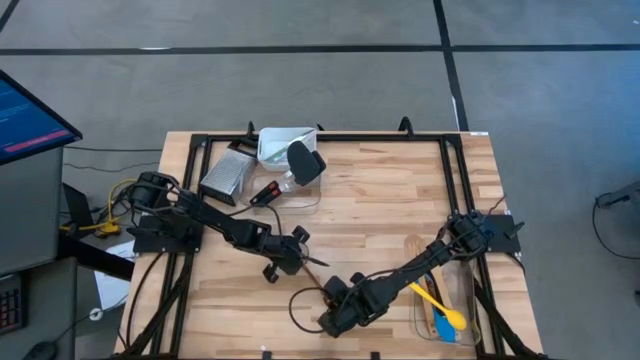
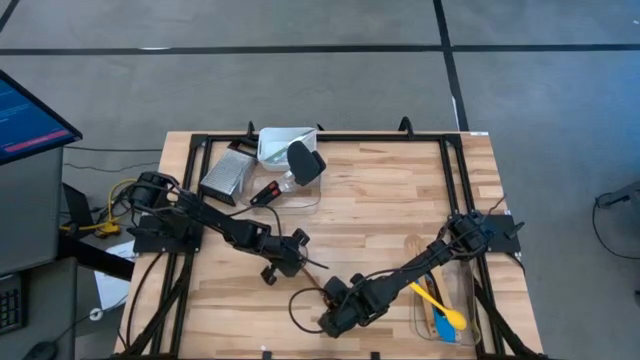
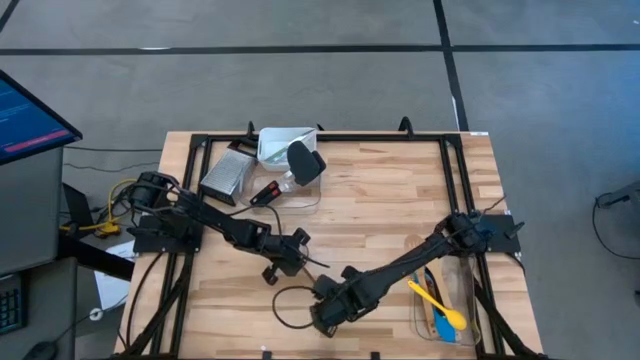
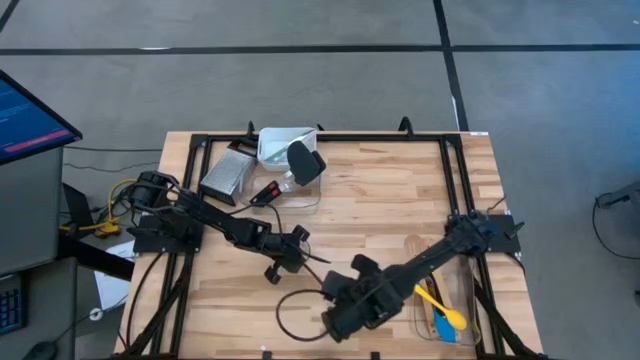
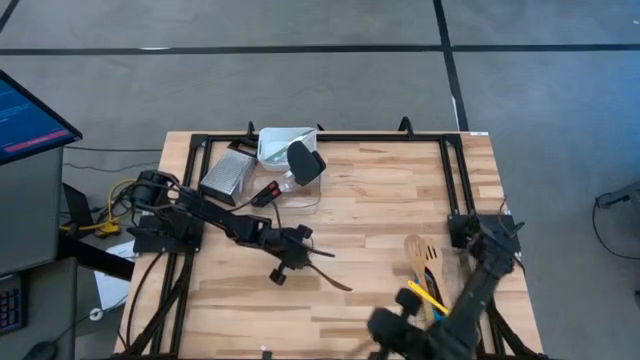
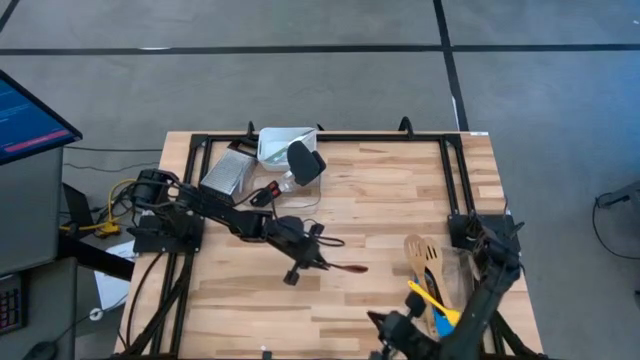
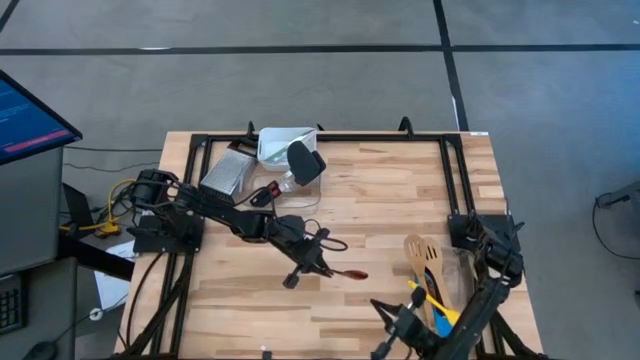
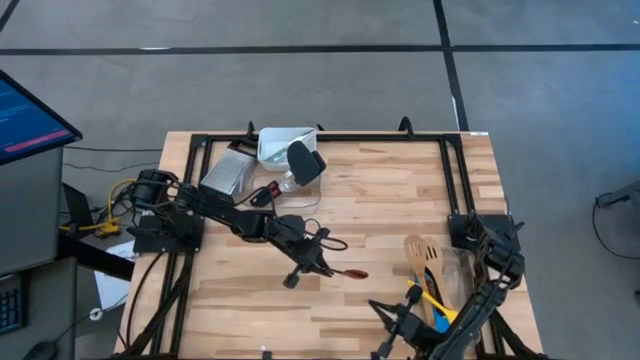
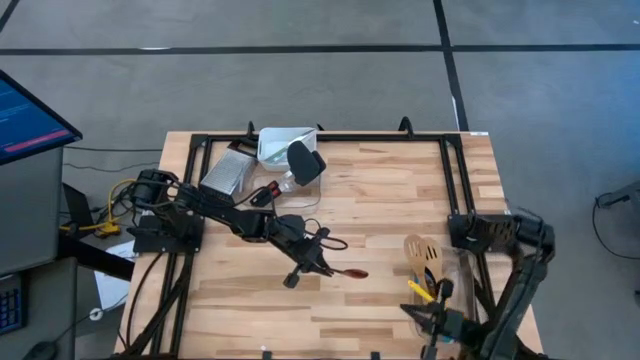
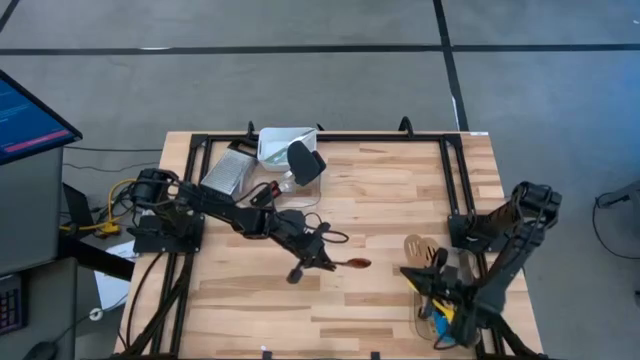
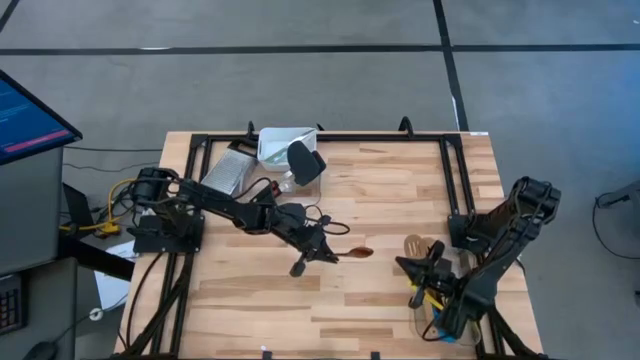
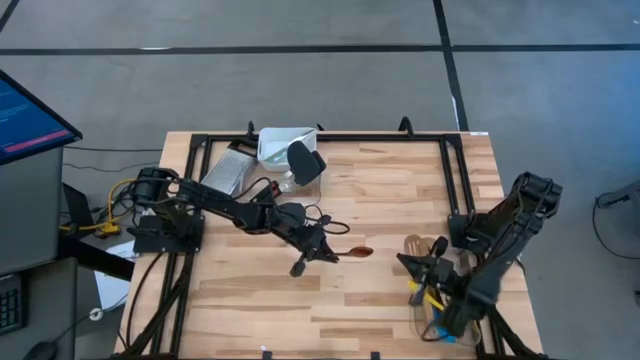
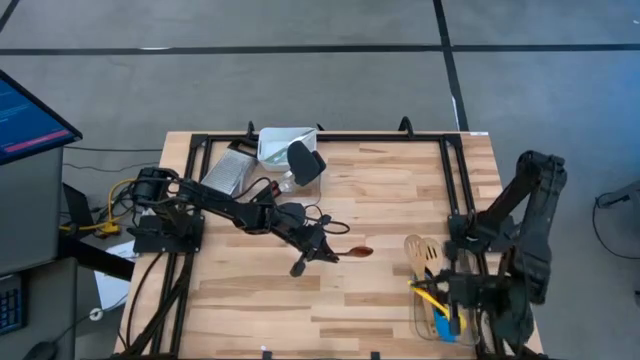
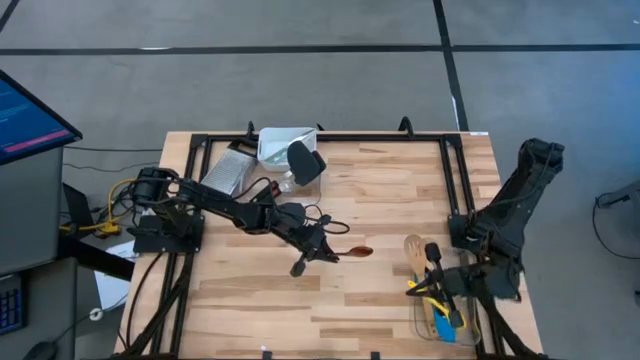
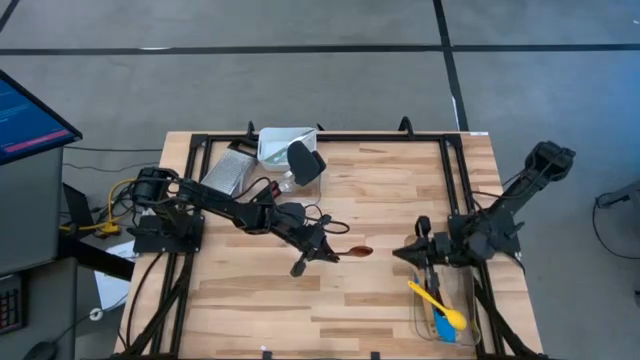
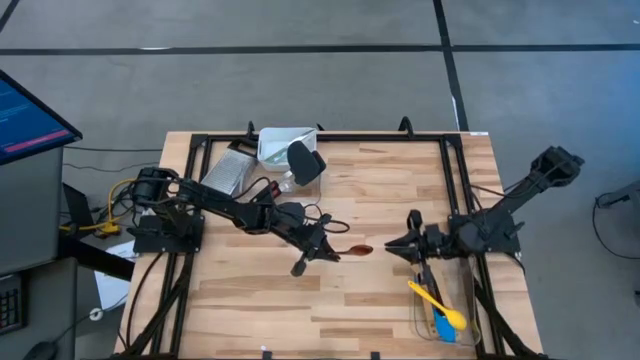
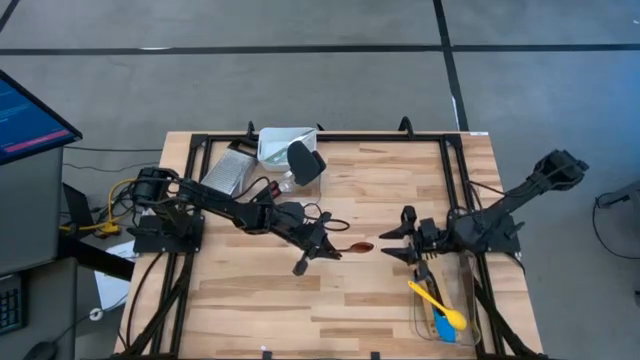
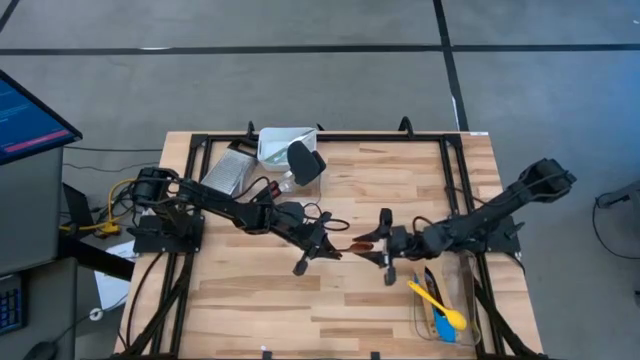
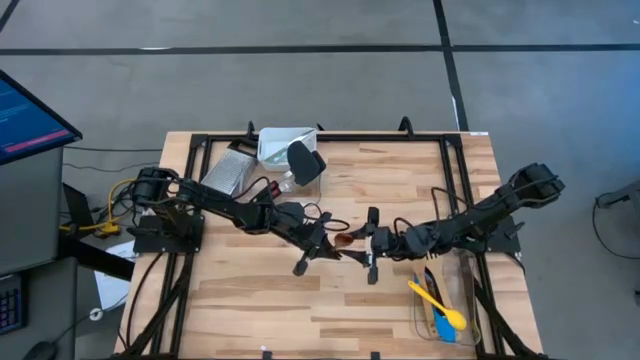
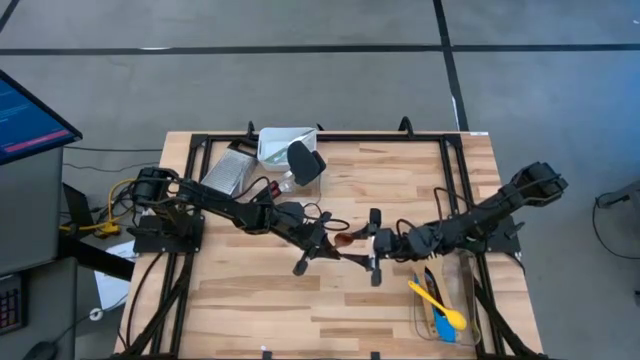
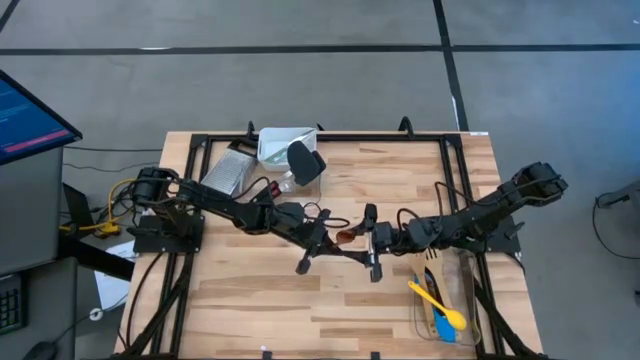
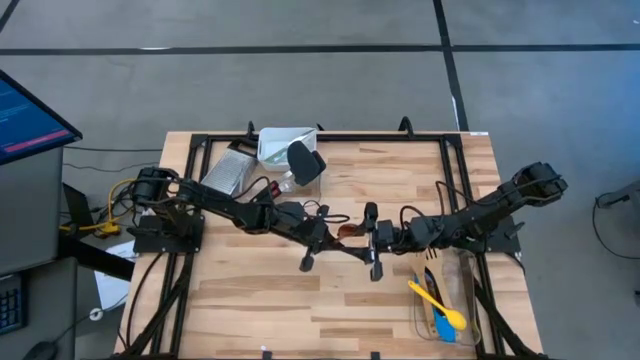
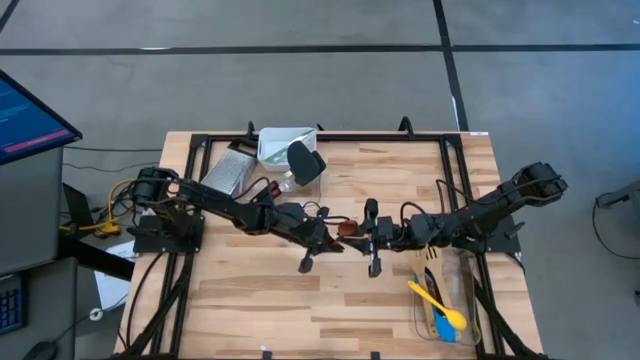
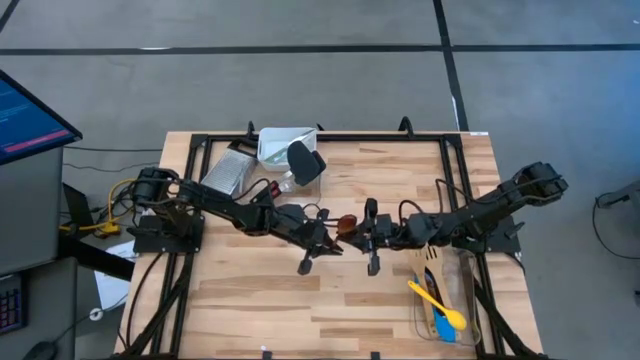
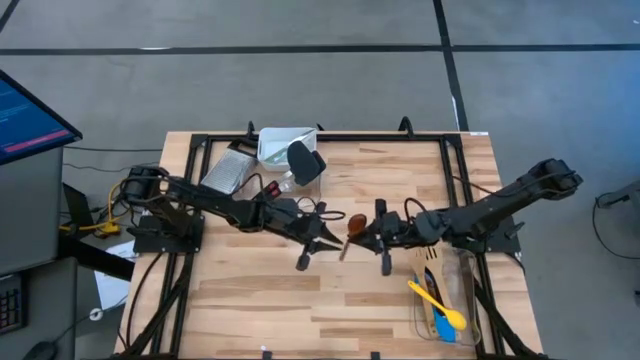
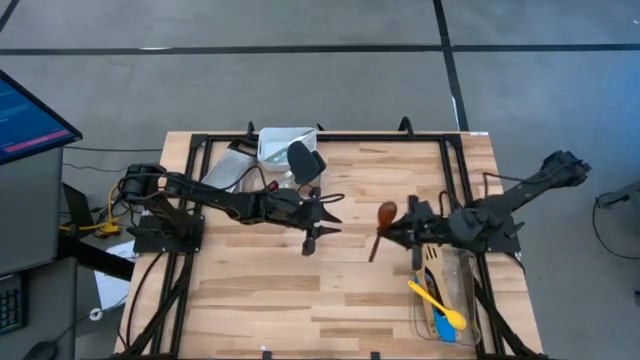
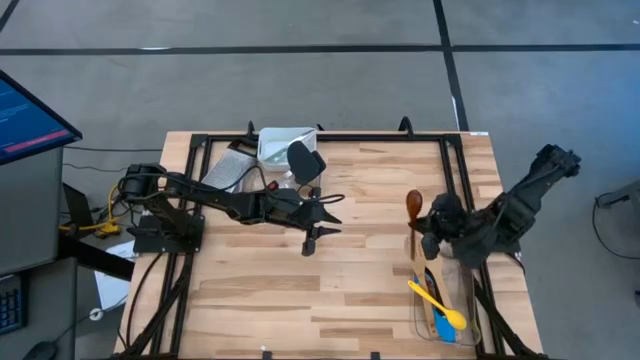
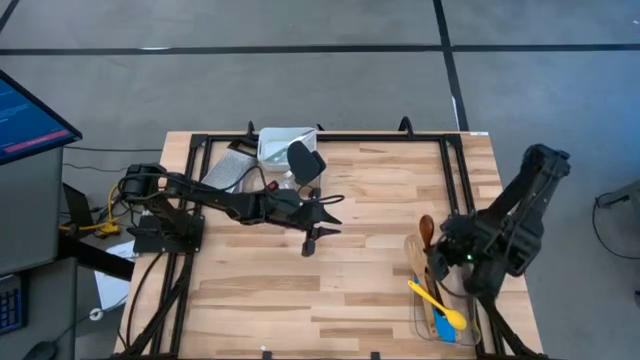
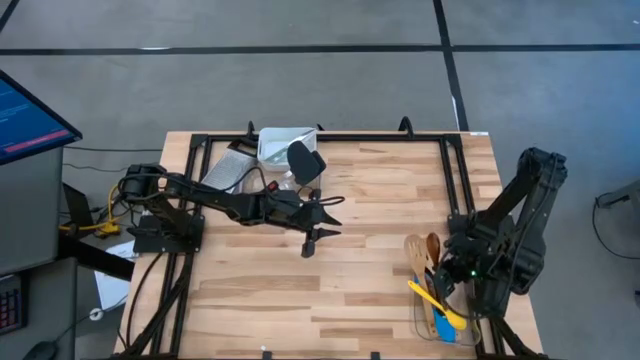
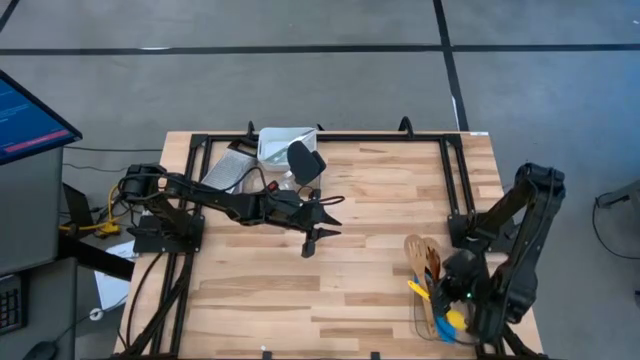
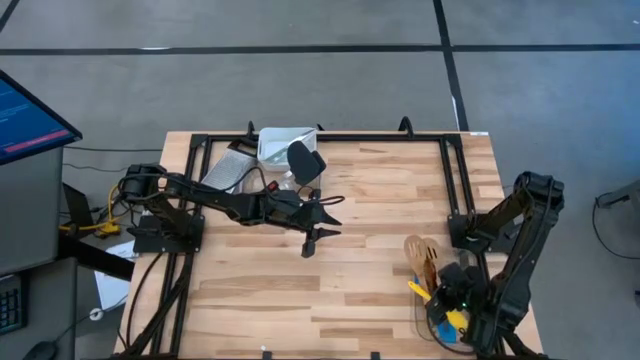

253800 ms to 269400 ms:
Task: Pick & Place Kitchen Items
Put the wooden spoon into the bottom transparent bin

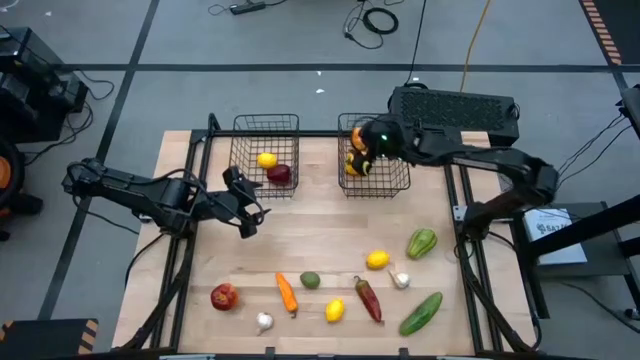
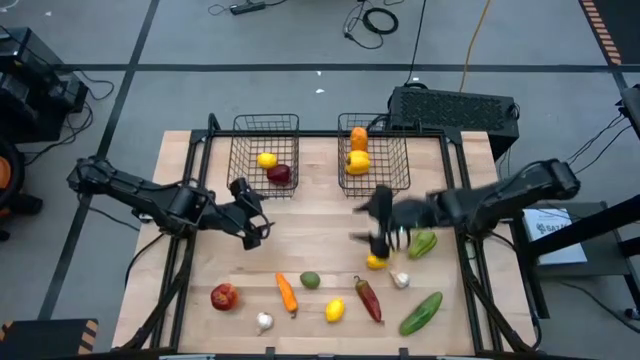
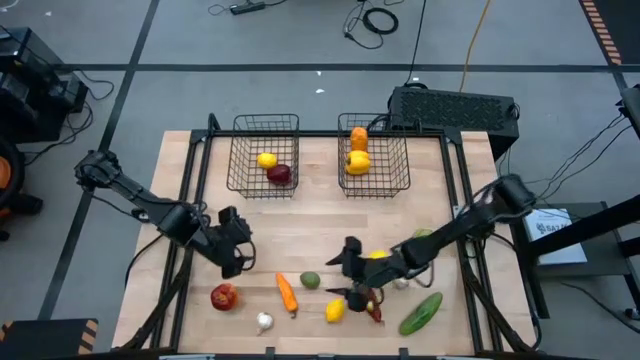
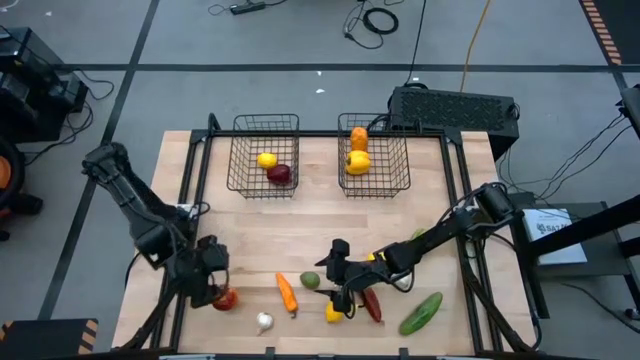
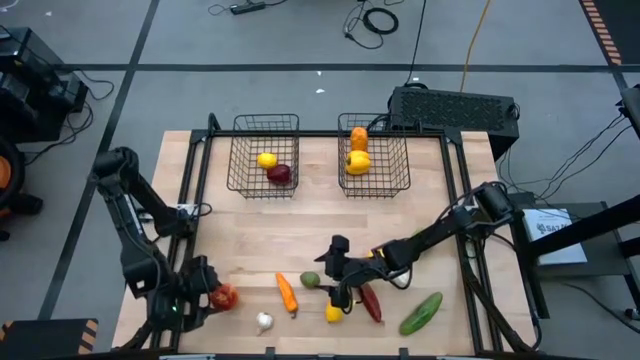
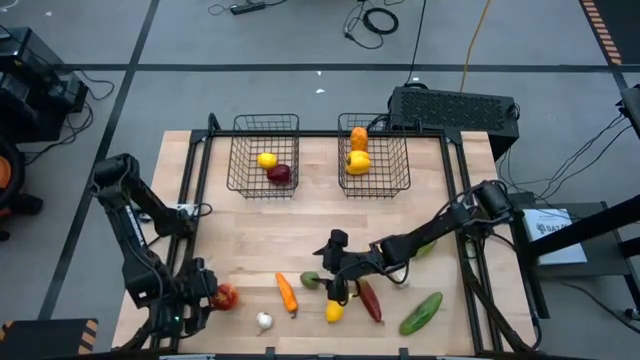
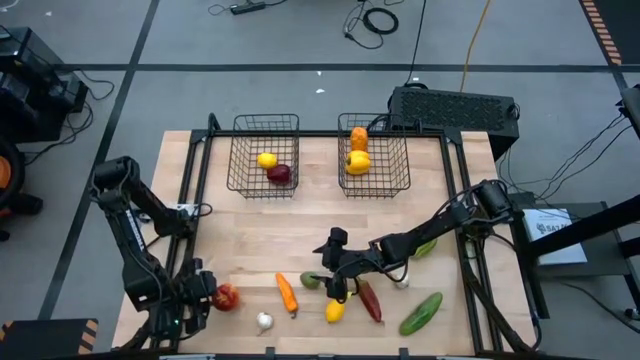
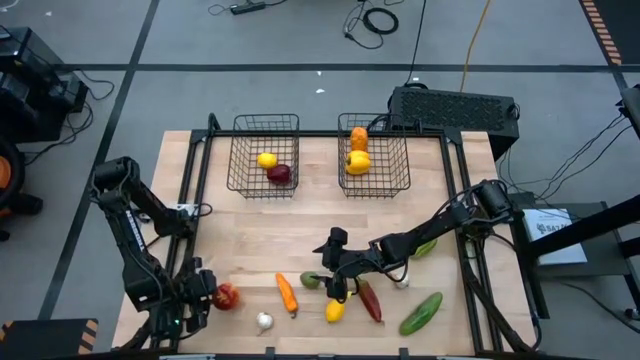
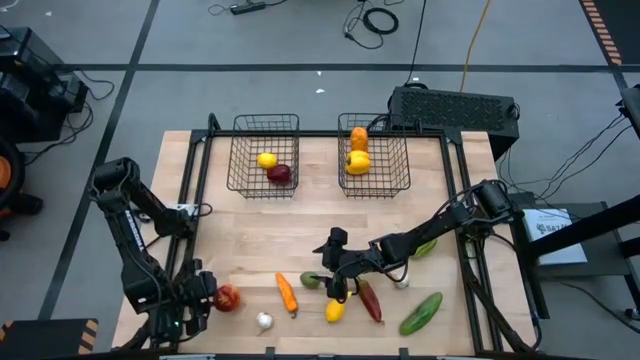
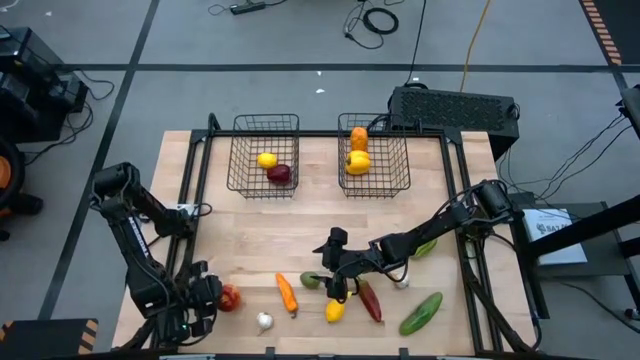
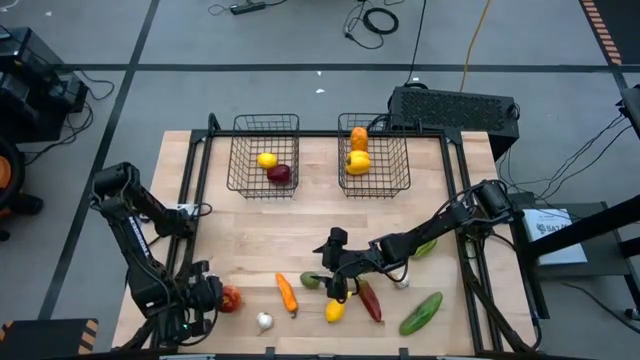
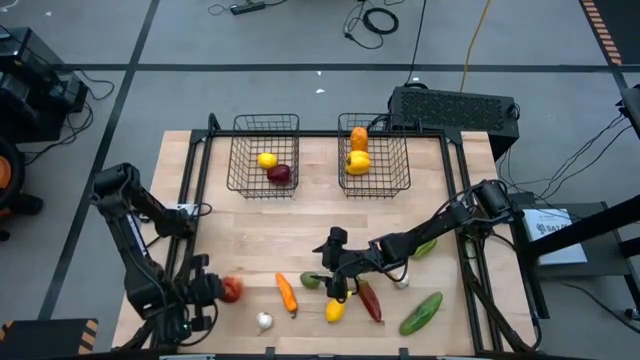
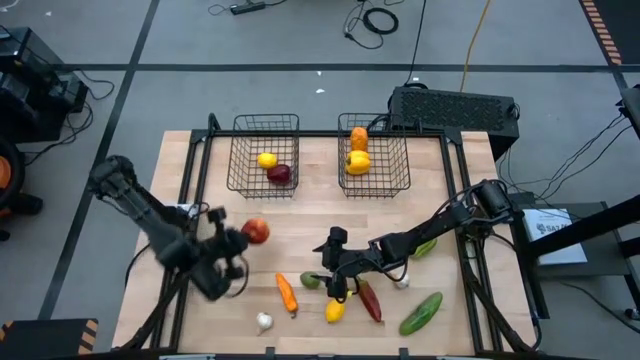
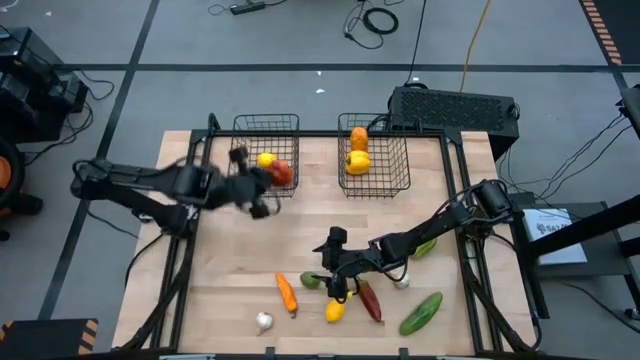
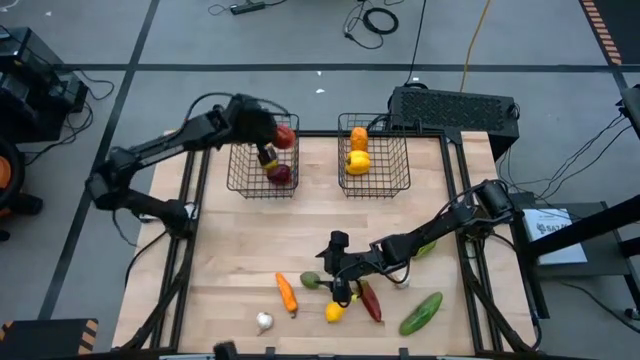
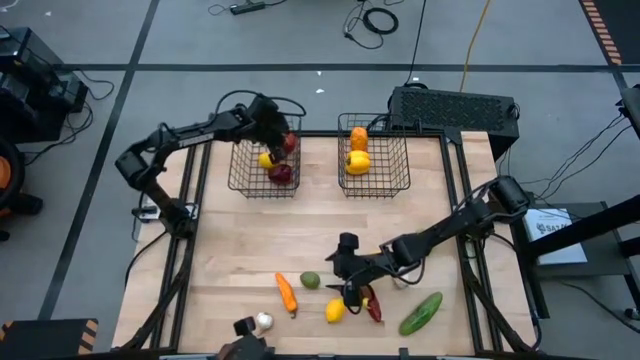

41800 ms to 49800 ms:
Task: Sort produce into baskets
Put the red red apple into the left mesh basket
